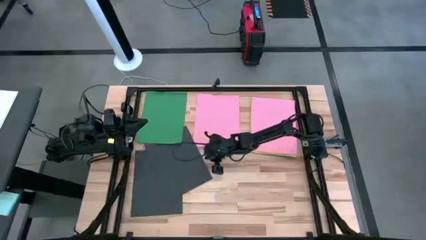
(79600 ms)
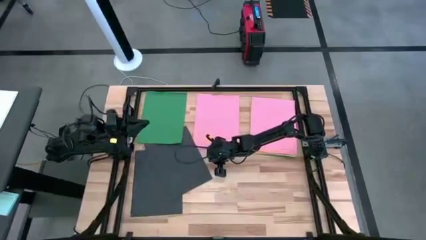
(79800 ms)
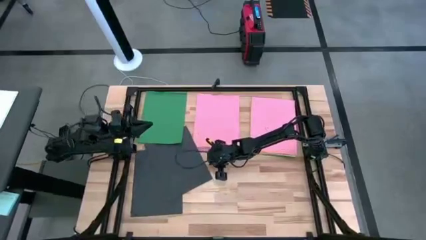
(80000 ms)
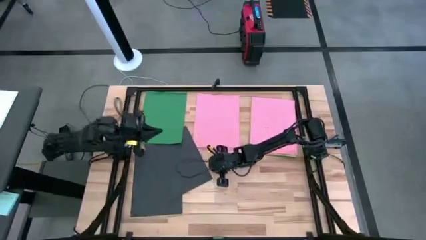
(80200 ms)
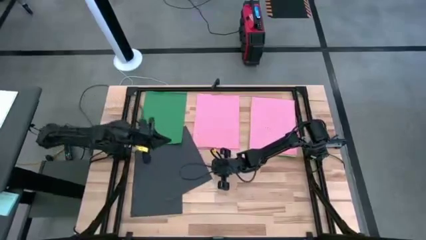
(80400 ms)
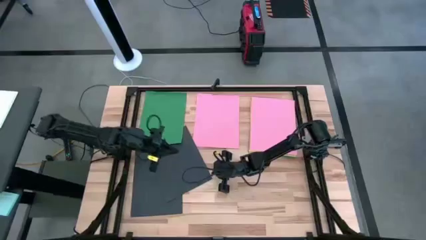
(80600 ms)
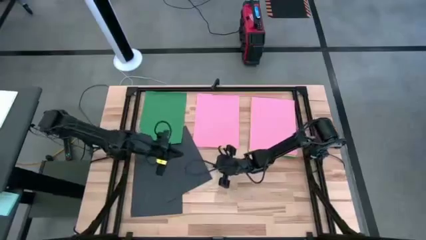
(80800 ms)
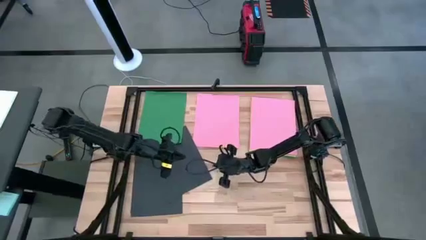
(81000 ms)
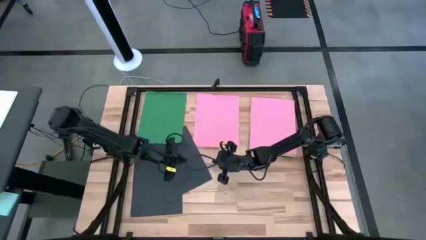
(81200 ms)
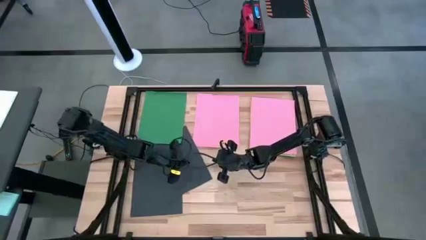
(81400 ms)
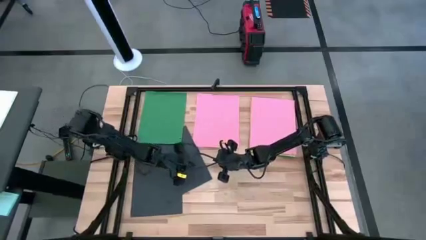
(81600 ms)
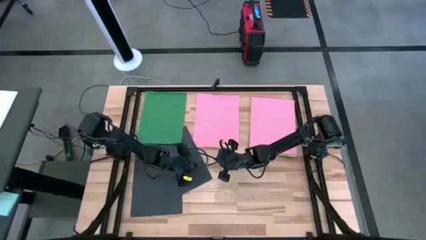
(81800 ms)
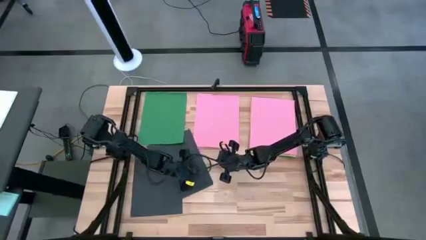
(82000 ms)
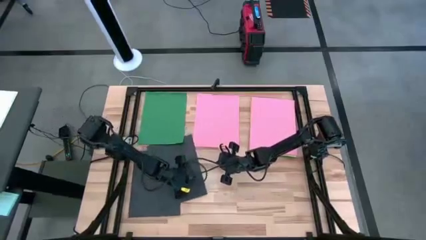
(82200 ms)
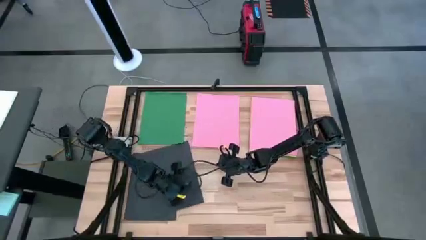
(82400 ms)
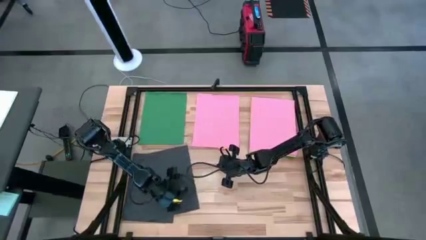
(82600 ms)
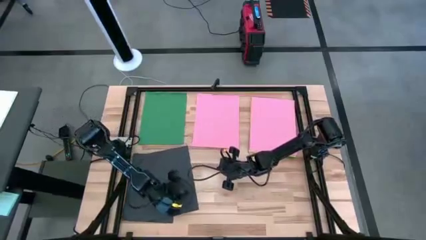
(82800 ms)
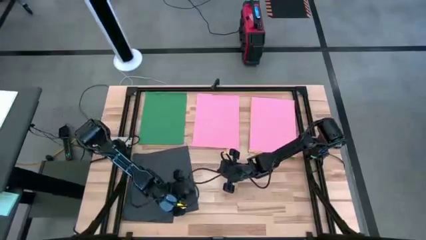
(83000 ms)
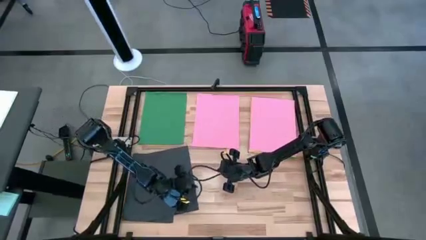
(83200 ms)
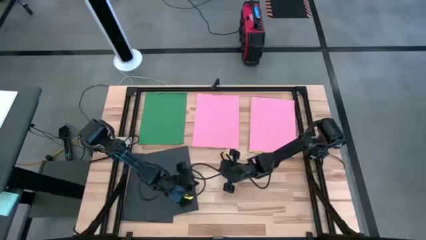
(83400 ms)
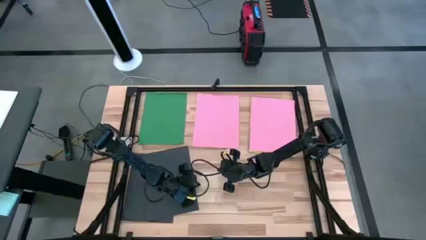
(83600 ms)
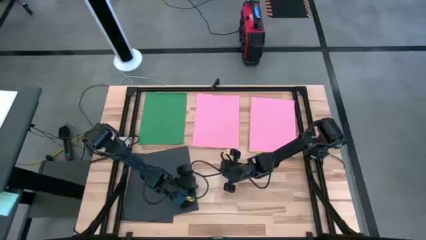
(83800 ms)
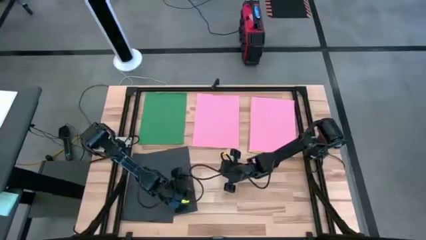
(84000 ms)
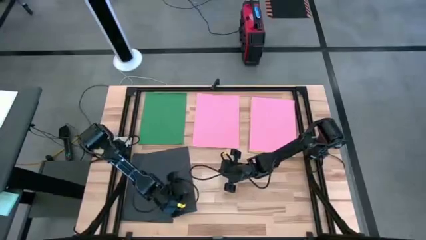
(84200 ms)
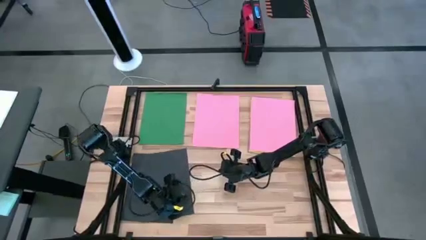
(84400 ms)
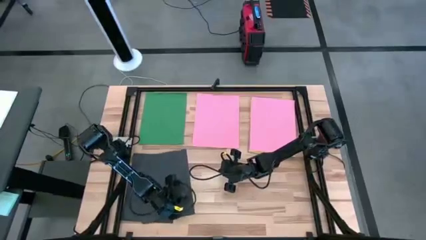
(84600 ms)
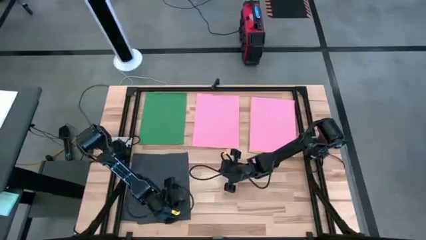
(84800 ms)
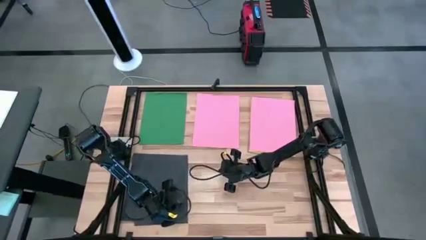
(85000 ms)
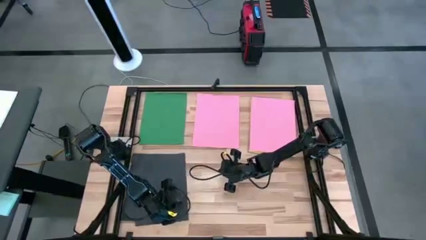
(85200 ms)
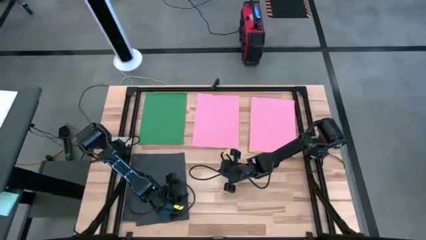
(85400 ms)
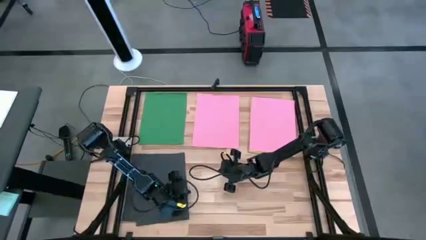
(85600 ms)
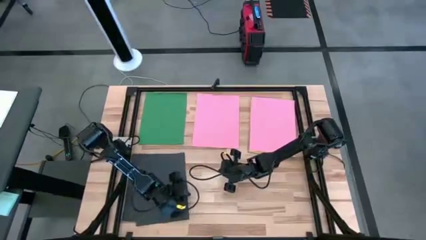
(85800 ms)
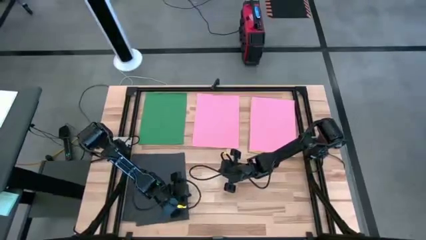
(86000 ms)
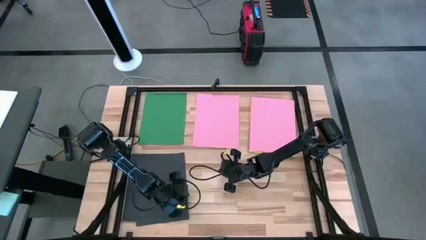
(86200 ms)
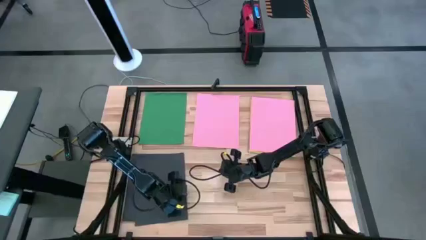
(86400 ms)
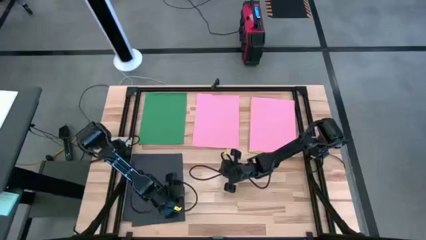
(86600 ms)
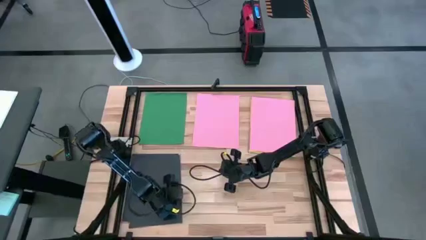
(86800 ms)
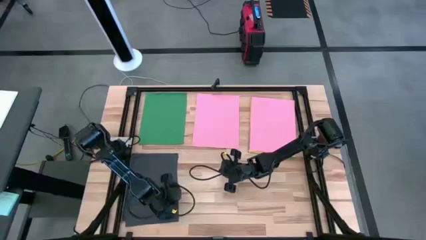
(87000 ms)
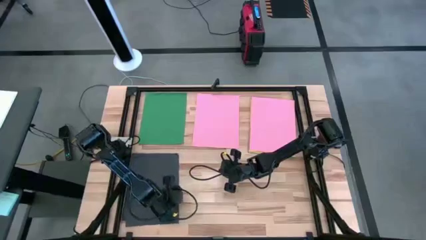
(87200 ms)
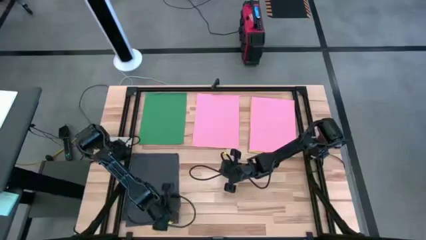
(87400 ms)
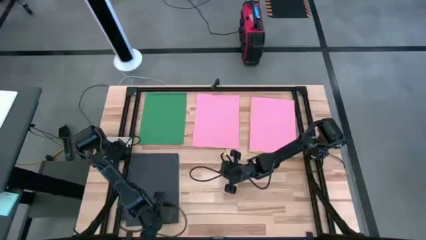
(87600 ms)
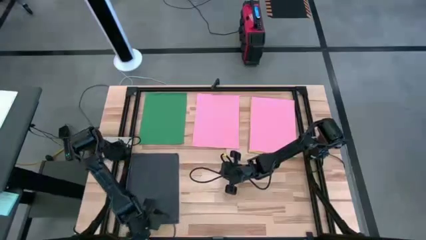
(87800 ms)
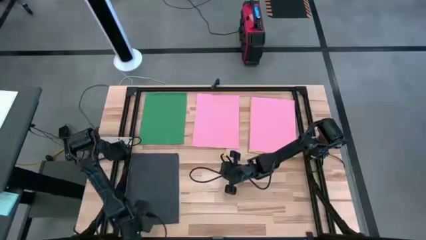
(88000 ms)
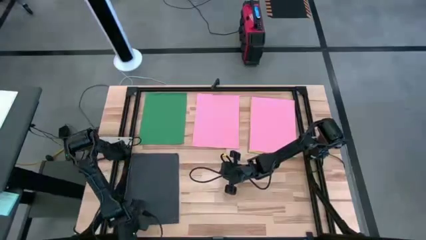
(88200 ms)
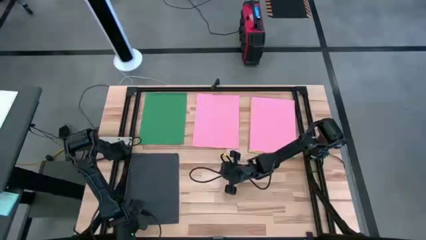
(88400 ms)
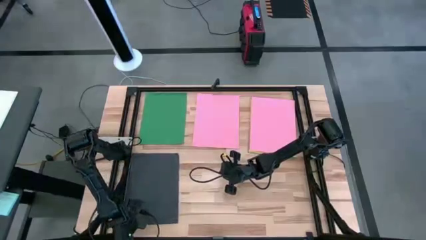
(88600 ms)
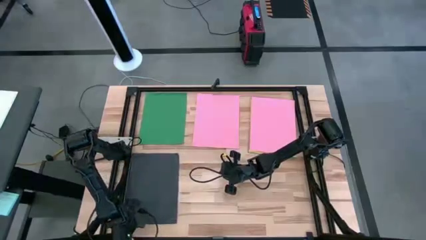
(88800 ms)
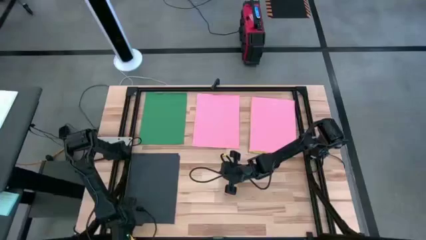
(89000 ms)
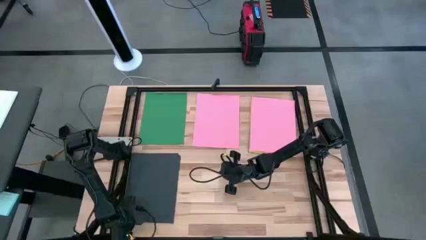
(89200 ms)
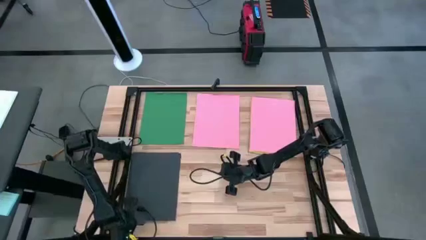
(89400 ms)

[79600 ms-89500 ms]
Task: Organize paper
Stack the black paper on top of the black paper
